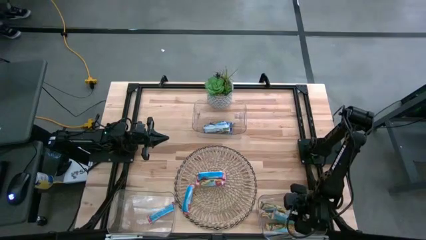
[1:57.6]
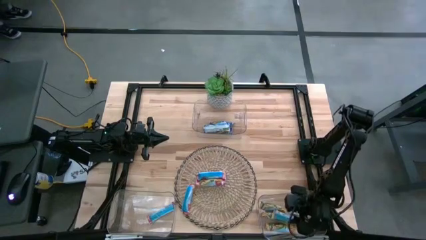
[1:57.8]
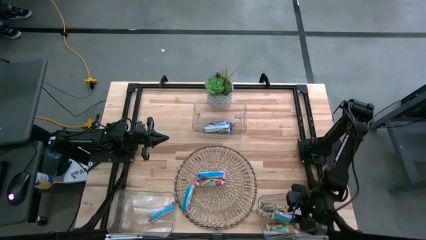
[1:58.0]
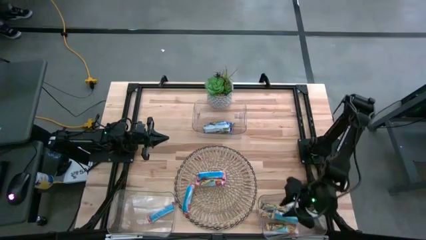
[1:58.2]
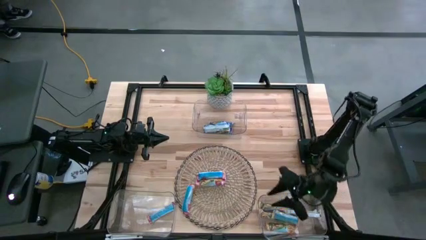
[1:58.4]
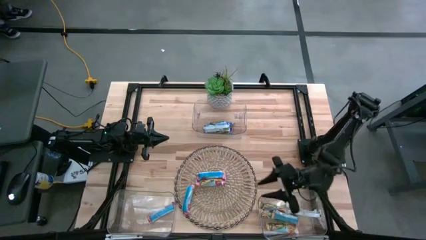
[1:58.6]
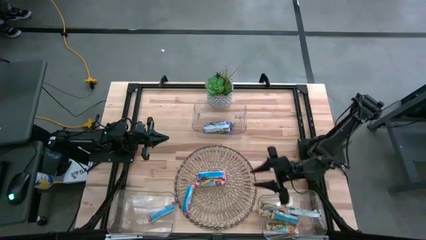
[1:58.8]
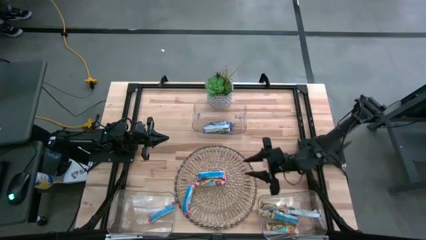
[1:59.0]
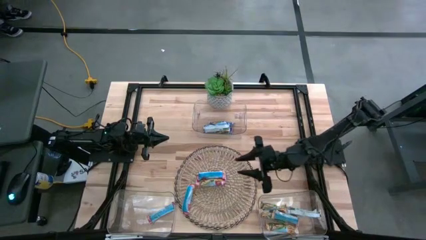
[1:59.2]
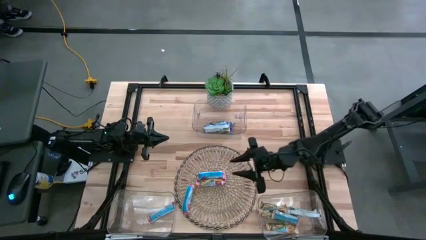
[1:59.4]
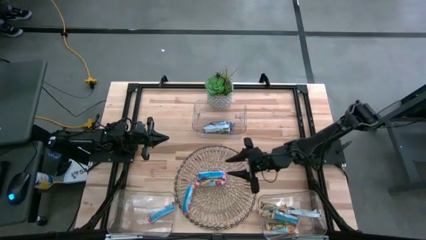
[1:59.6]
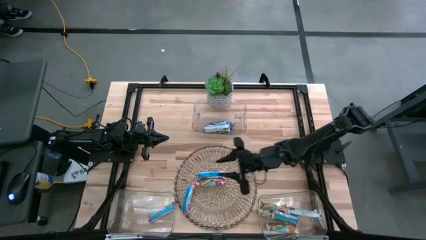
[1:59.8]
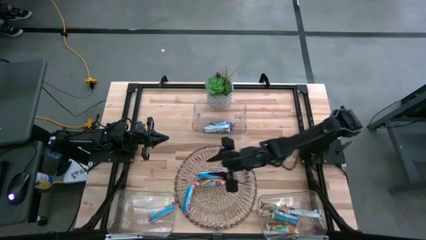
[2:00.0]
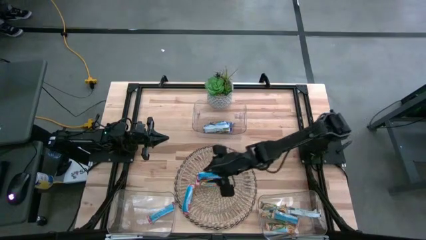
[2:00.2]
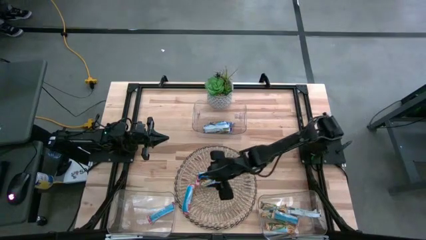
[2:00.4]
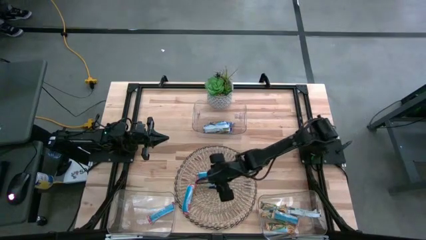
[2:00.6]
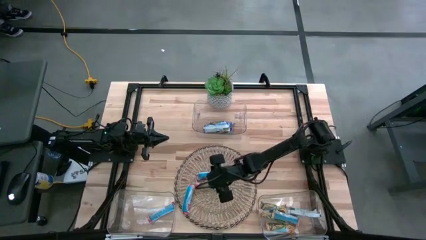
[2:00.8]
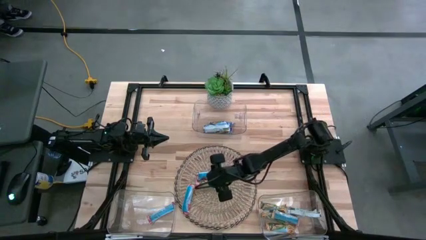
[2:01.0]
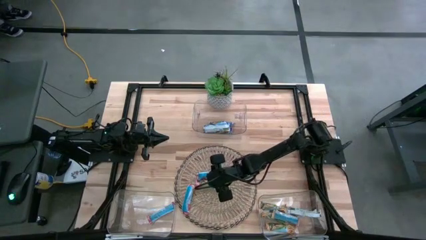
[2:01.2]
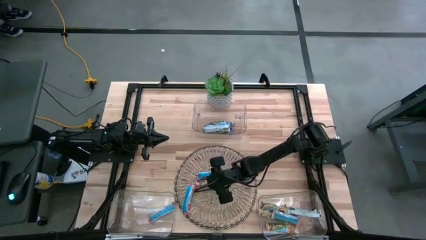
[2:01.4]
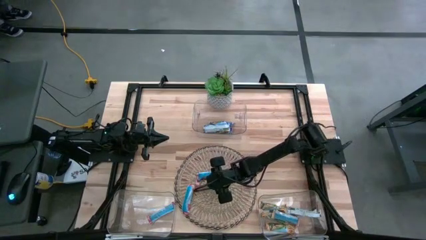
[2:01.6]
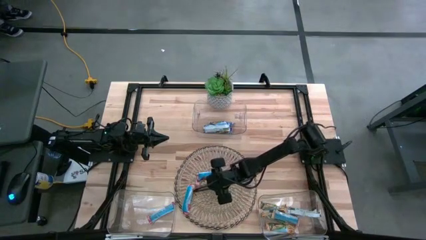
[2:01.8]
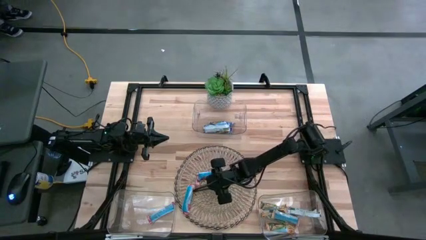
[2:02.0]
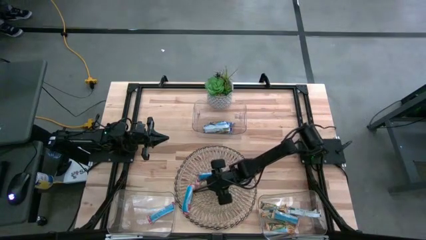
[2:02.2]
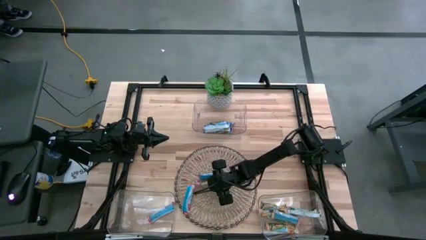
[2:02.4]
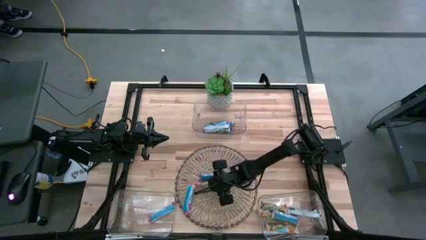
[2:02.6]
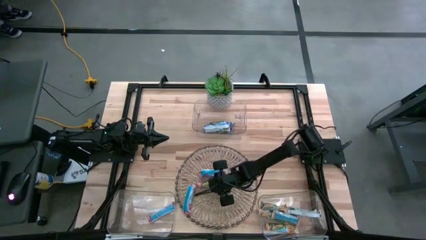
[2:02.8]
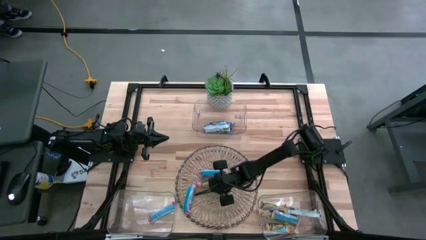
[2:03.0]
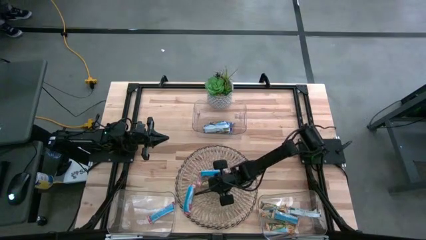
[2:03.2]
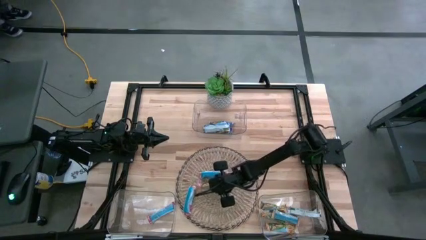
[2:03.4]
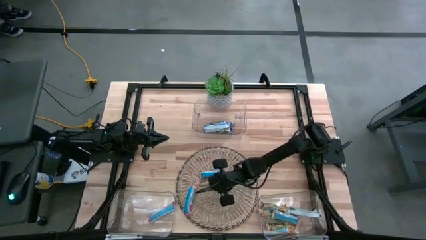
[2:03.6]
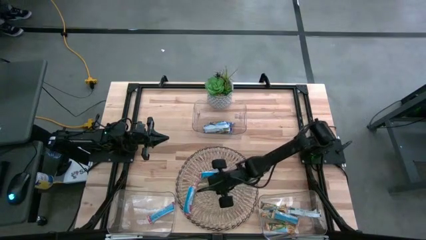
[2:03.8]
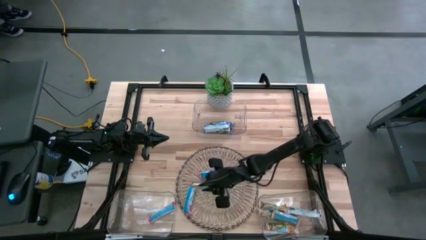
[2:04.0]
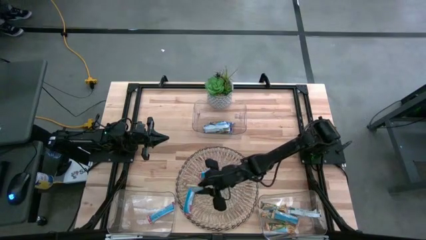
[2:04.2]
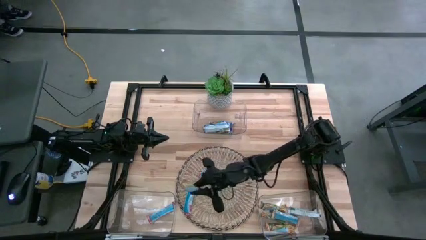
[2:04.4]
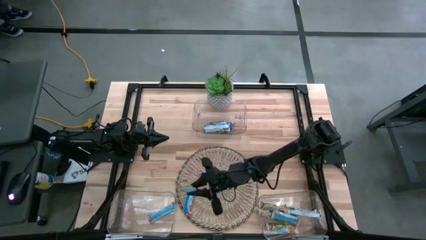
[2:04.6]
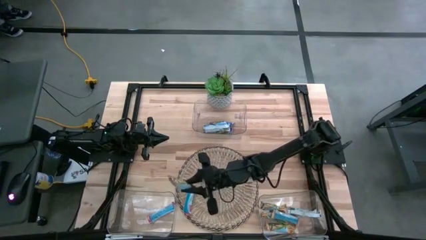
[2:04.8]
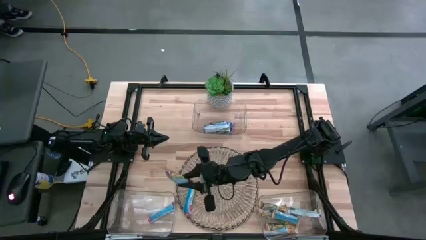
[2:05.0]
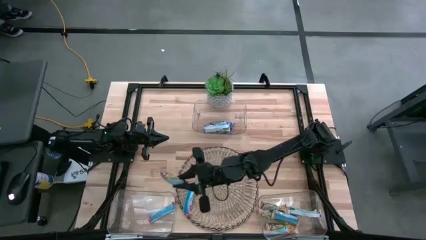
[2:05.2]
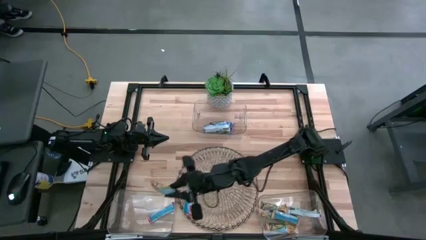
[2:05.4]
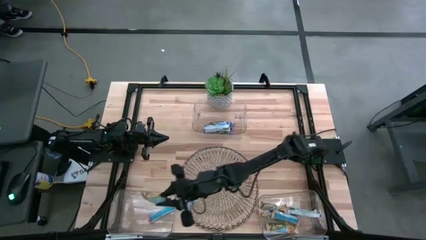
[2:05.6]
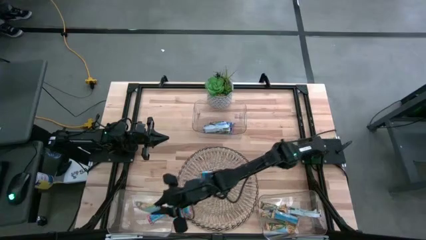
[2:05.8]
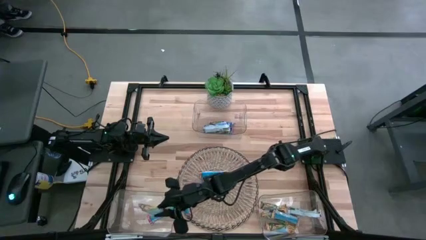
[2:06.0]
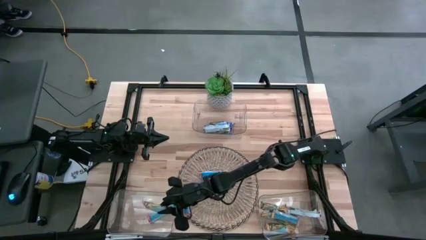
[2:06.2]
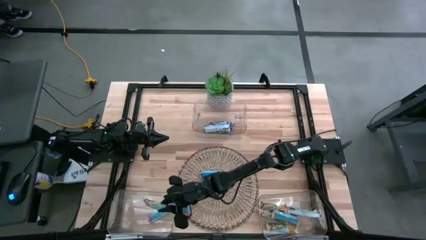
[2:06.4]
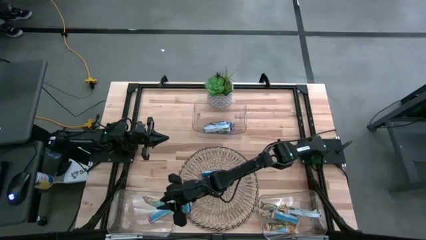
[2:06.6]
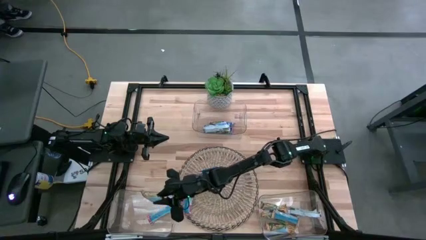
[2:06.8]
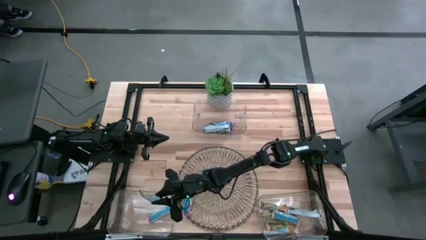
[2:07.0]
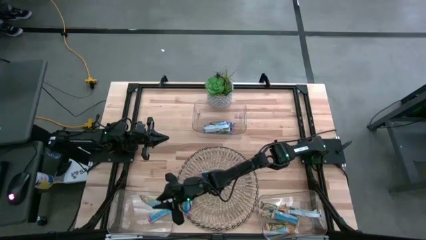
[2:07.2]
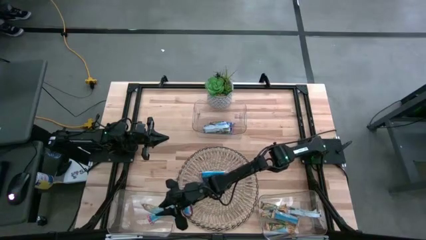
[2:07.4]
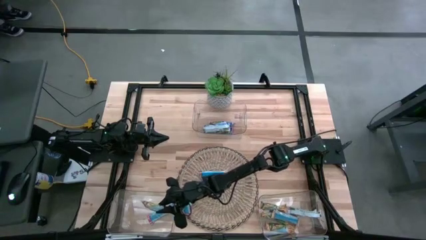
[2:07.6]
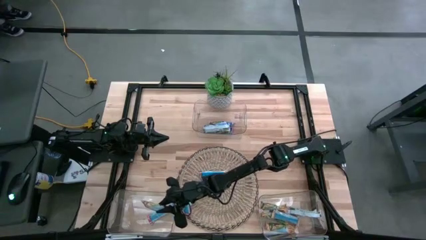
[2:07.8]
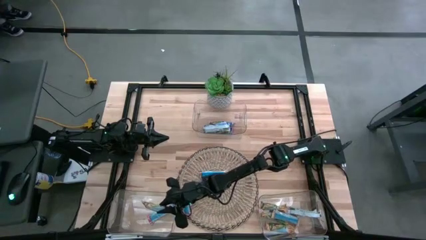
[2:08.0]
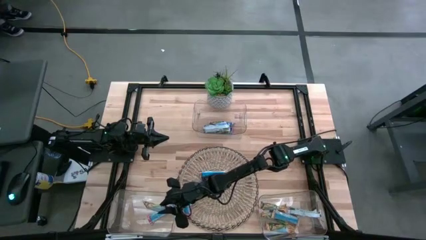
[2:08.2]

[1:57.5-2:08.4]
Task: Pick and place Granola Bars by type
Put the red granola bar into the bottom left transparent bin

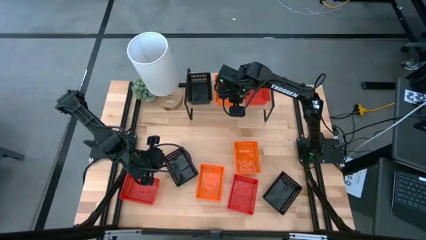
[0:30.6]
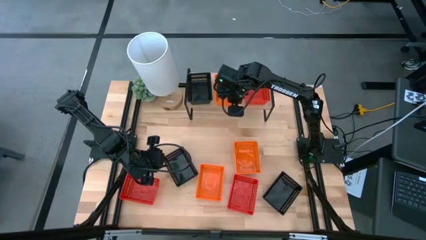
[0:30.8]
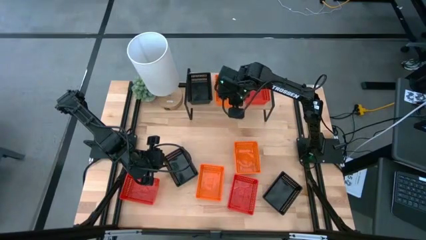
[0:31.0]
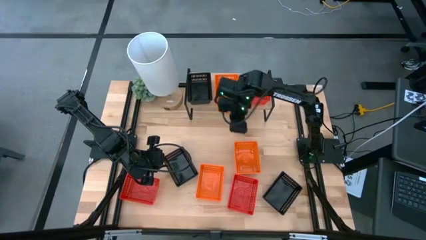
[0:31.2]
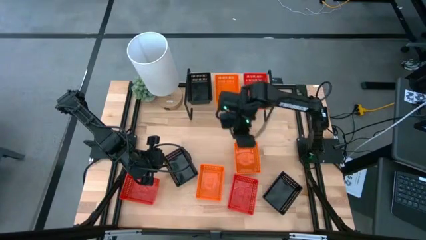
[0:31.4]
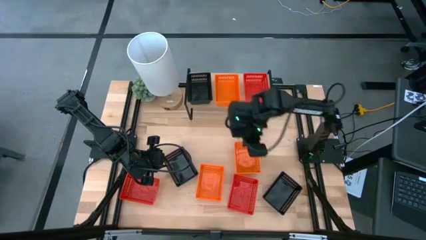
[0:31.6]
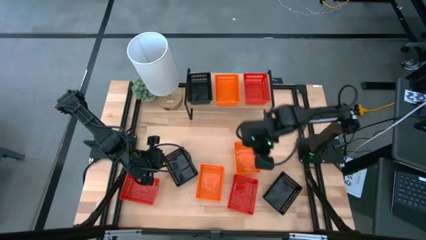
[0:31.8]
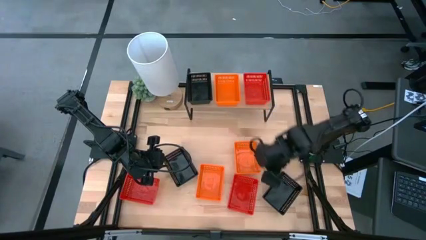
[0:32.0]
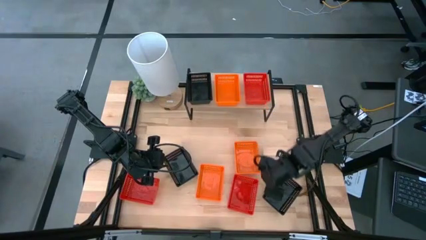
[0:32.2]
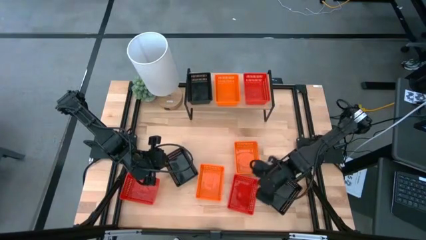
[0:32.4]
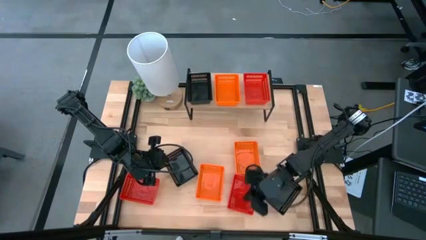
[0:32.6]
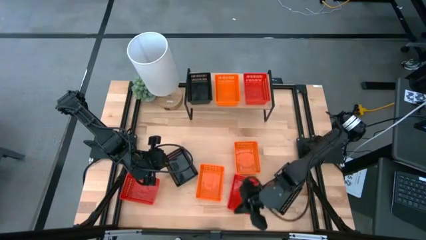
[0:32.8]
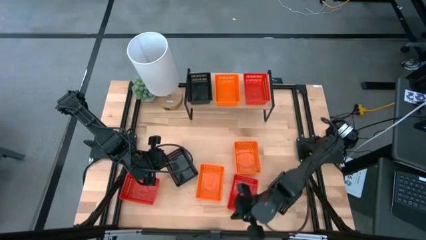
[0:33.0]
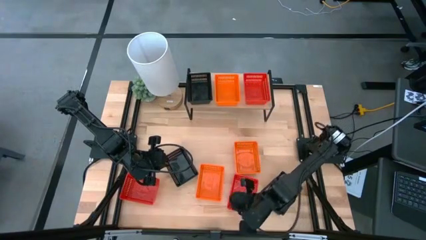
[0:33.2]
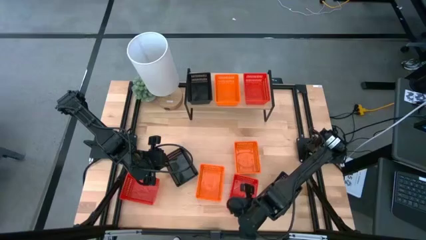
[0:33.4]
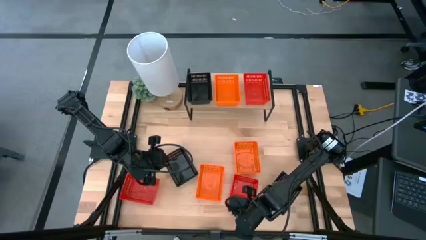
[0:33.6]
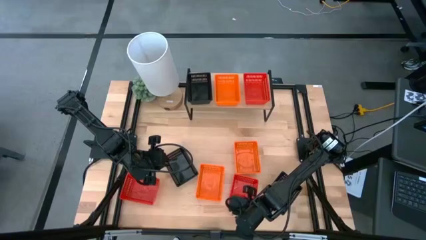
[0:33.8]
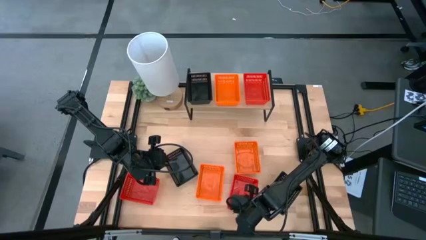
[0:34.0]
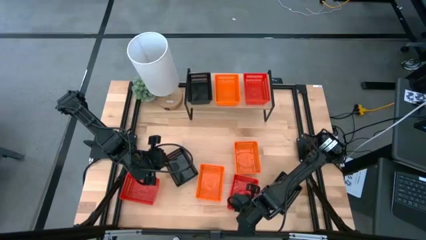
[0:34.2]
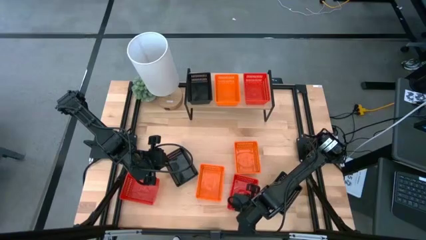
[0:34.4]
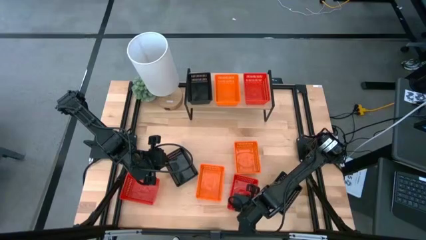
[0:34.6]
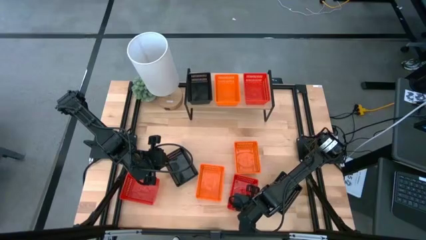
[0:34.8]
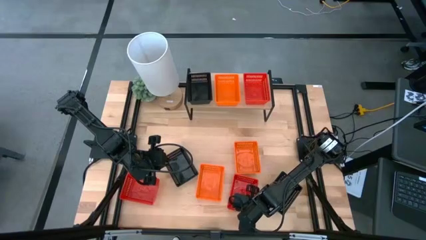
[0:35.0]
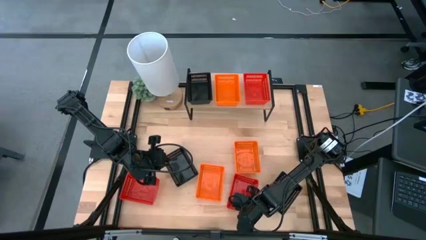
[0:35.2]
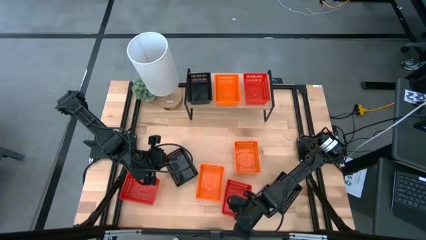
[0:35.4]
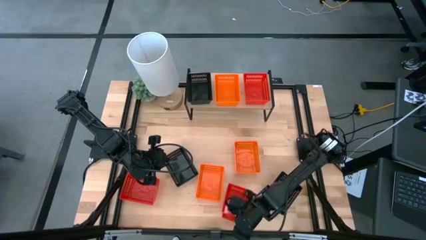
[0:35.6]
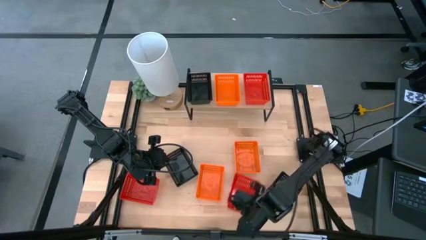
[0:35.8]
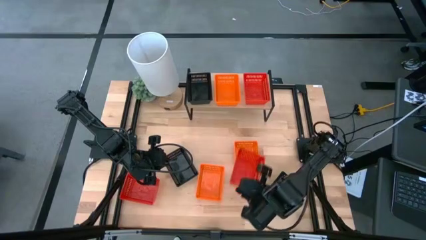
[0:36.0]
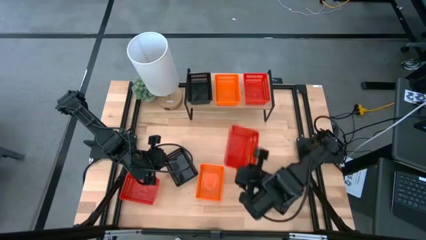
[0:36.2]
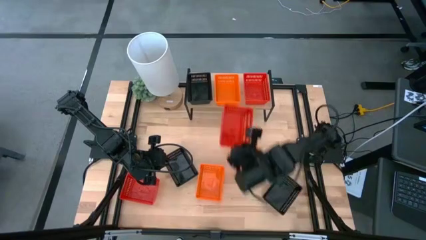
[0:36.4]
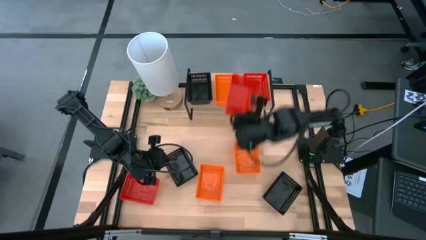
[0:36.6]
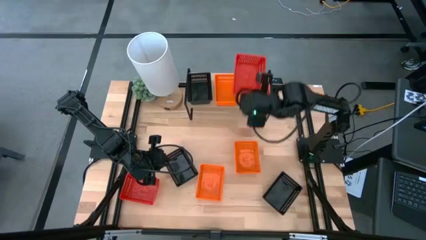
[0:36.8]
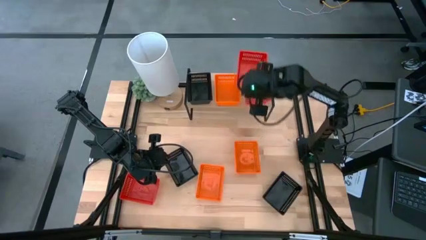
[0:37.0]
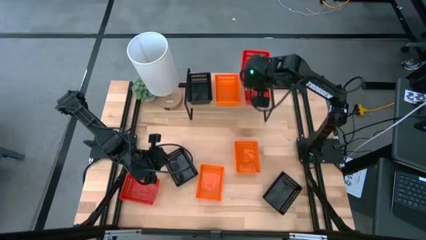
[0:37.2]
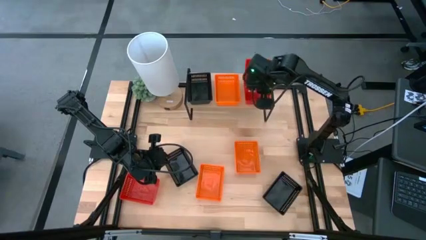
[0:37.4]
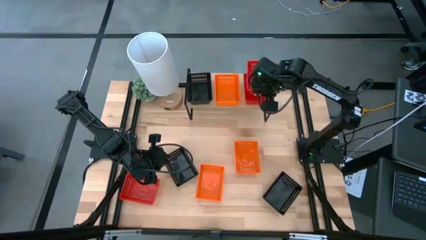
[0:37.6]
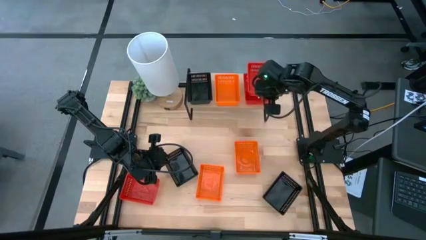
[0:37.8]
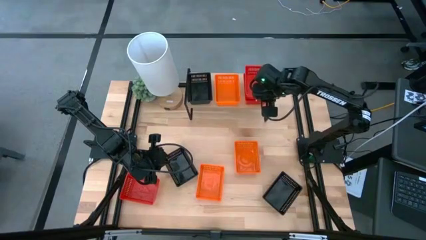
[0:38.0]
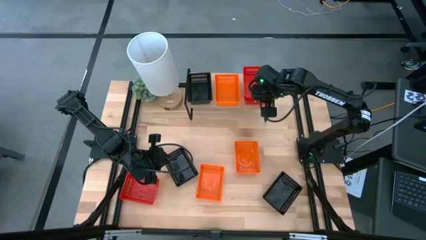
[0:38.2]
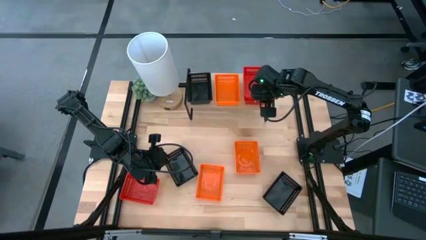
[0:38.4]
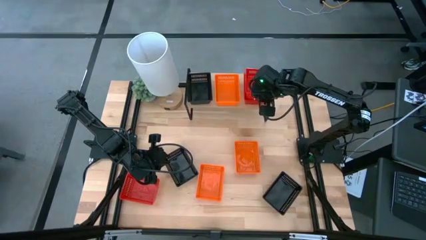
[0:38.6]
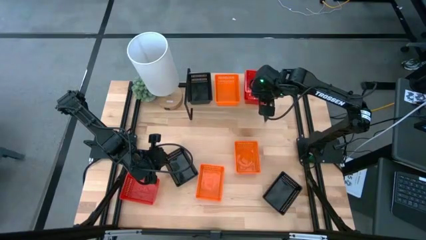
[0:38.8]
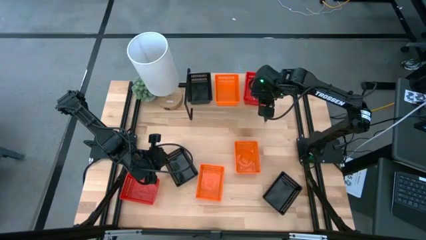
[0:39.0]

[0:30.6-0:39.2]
Task: Stack baskets on shelf by color
Stack the right red bin on top of the red bin on the shelf
